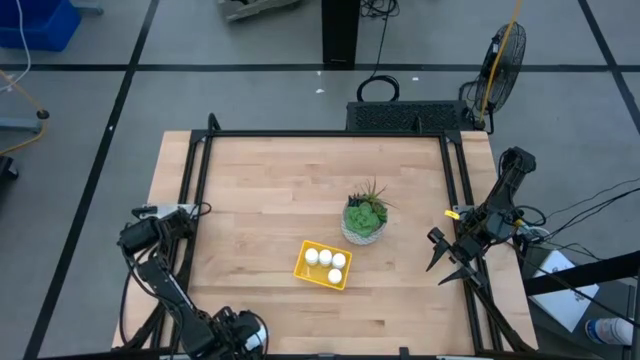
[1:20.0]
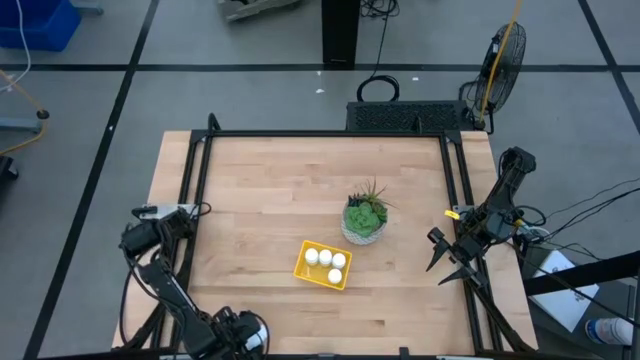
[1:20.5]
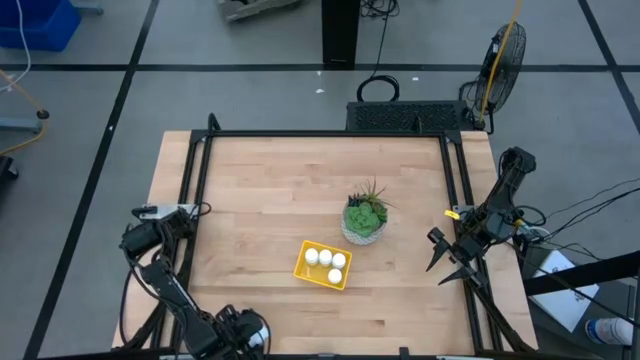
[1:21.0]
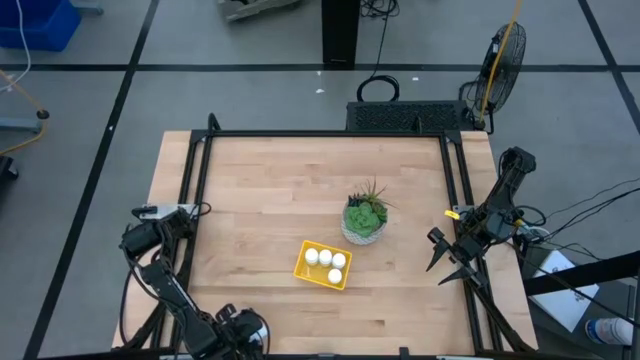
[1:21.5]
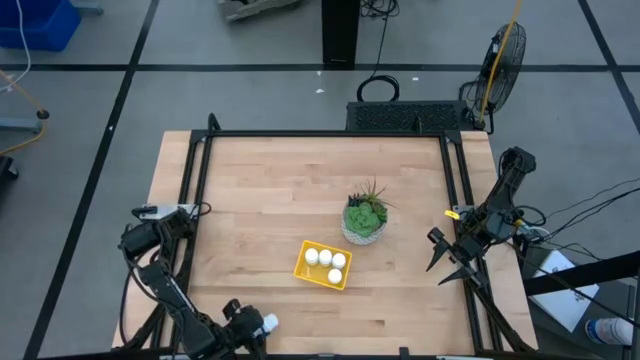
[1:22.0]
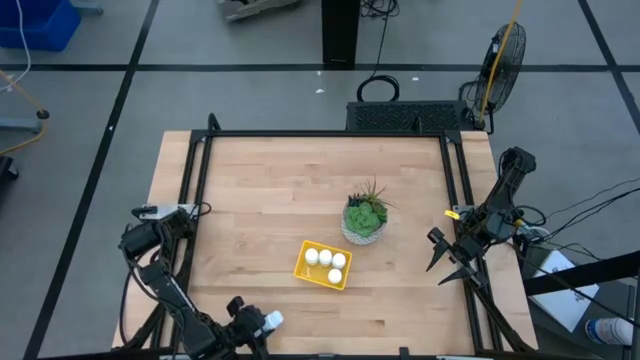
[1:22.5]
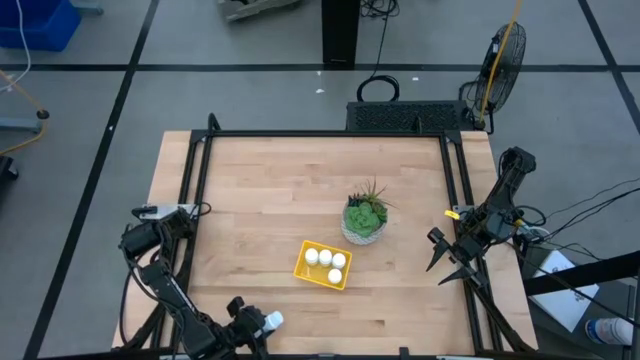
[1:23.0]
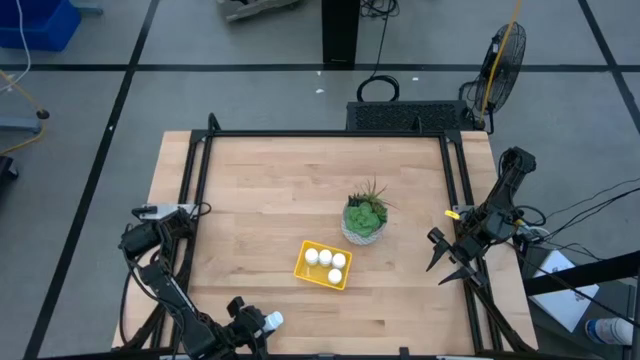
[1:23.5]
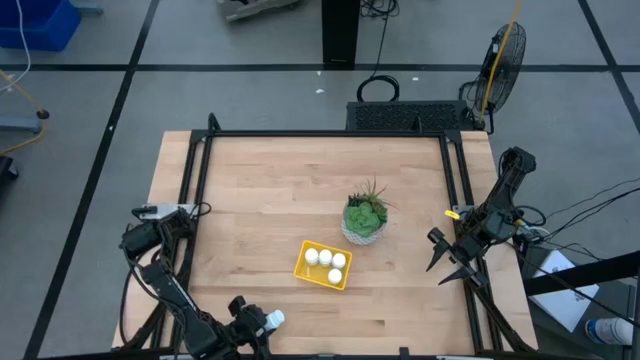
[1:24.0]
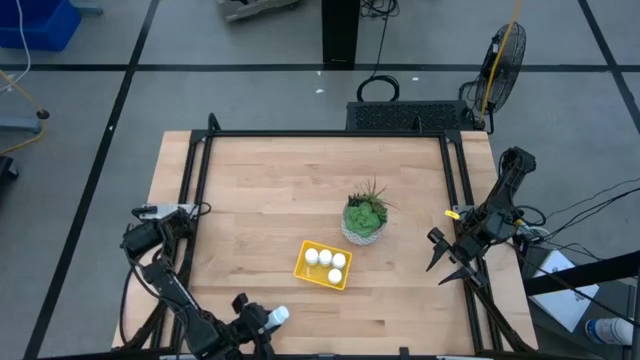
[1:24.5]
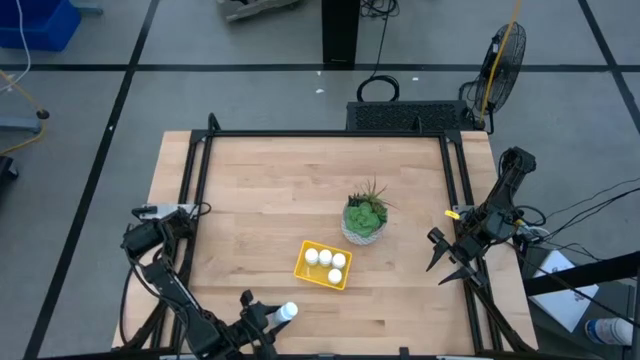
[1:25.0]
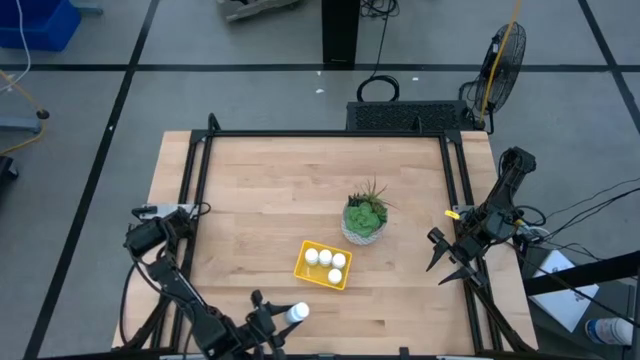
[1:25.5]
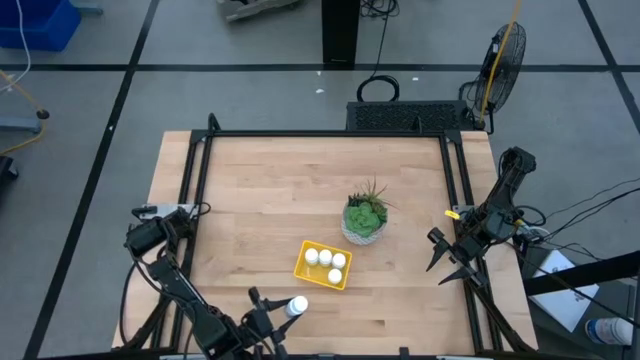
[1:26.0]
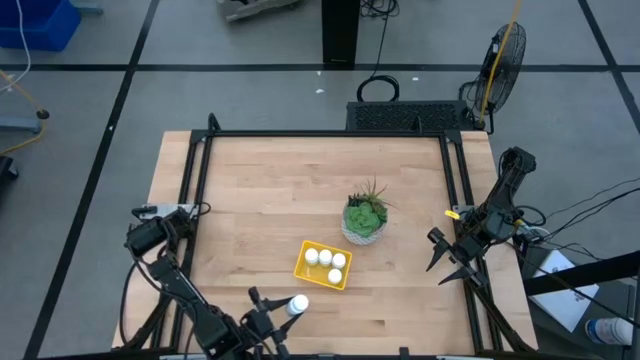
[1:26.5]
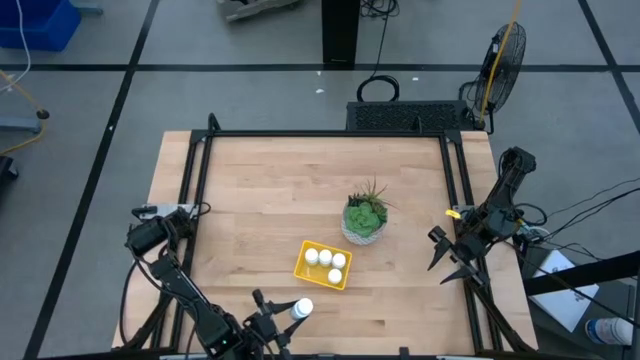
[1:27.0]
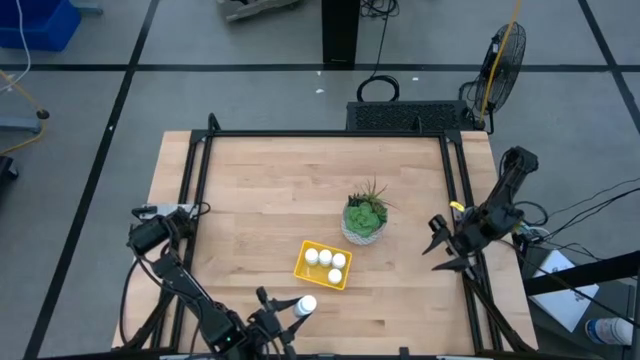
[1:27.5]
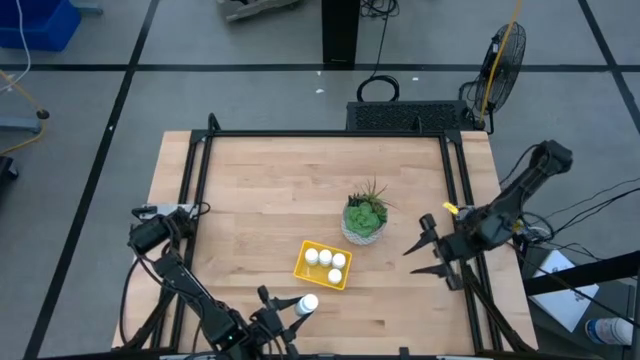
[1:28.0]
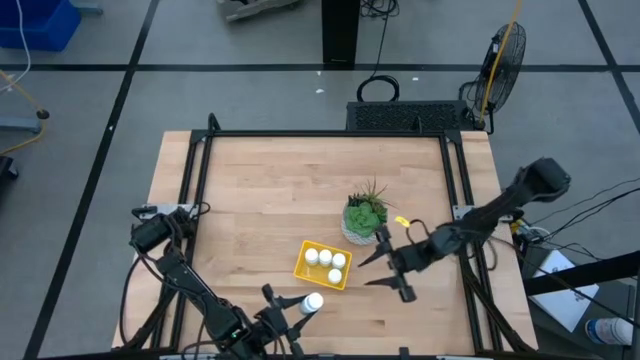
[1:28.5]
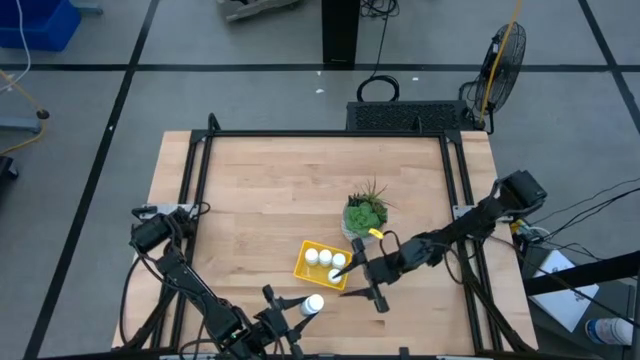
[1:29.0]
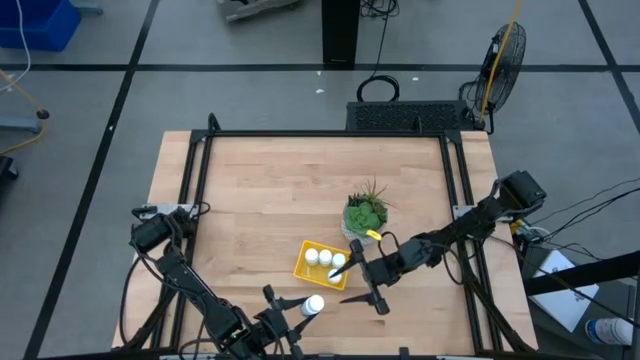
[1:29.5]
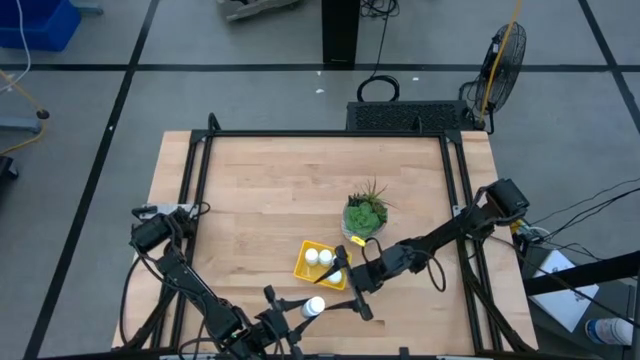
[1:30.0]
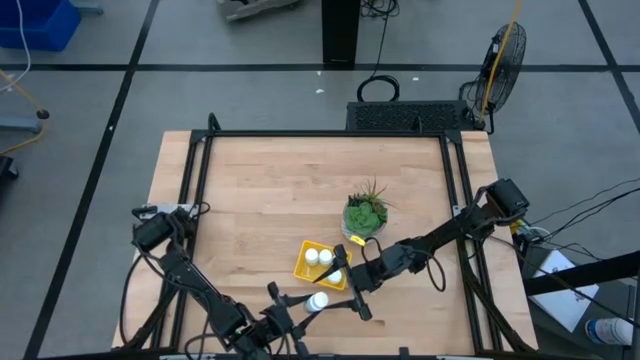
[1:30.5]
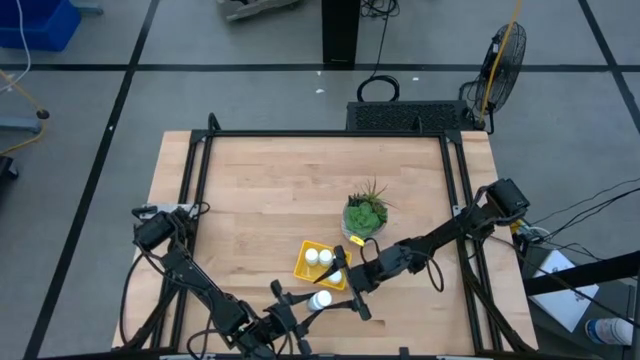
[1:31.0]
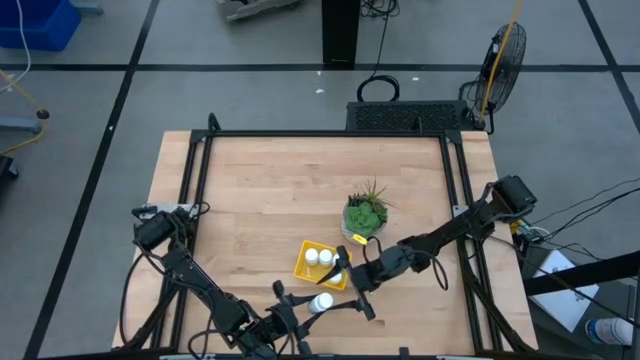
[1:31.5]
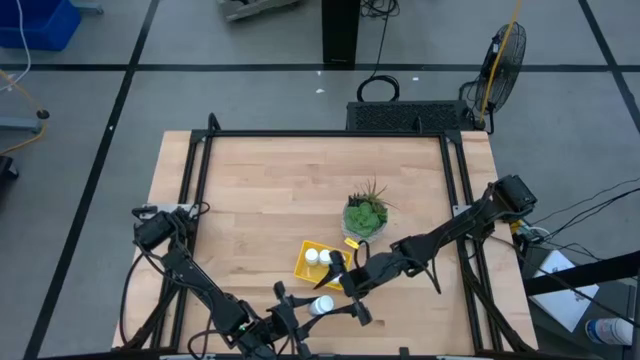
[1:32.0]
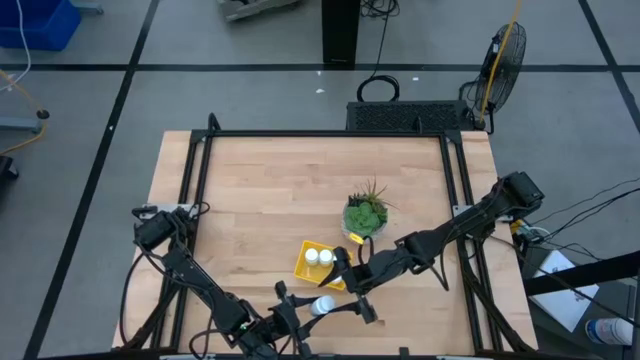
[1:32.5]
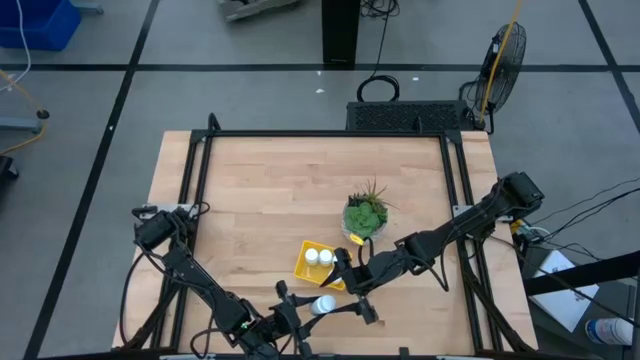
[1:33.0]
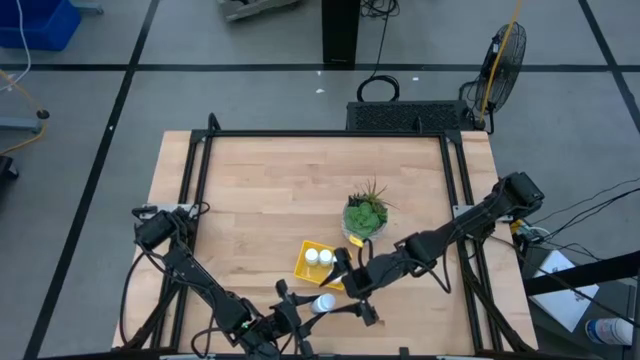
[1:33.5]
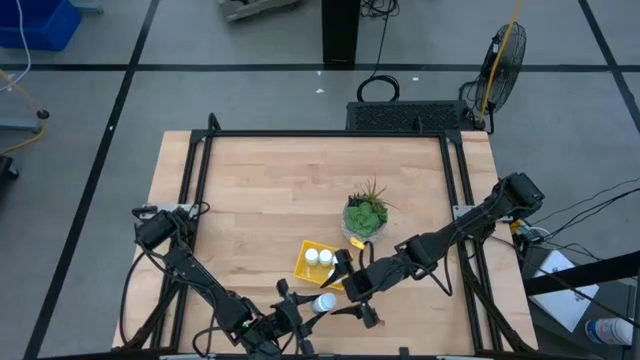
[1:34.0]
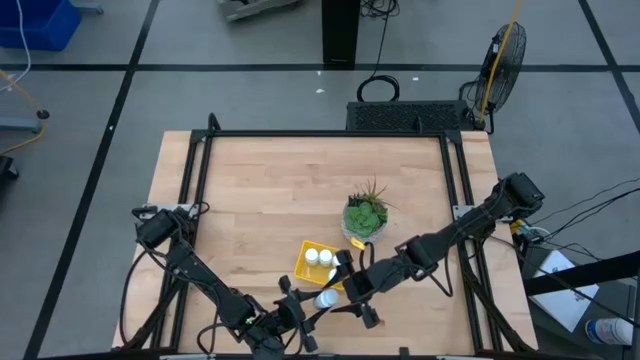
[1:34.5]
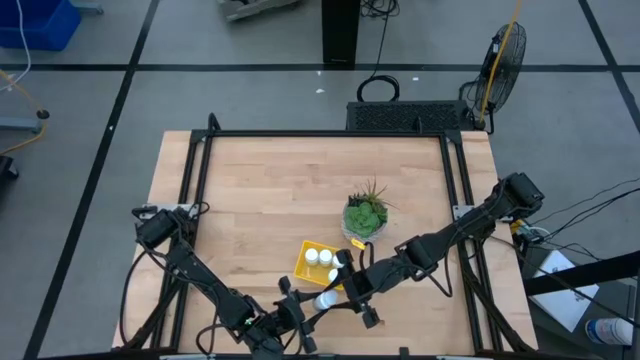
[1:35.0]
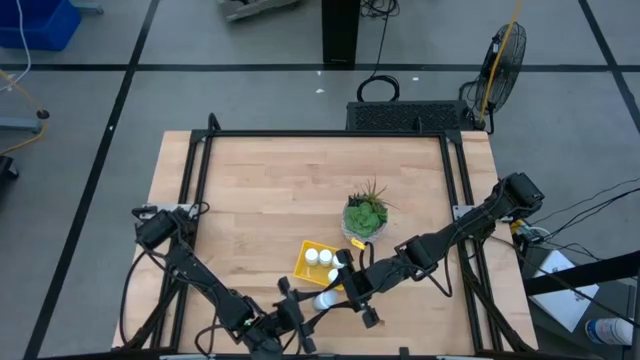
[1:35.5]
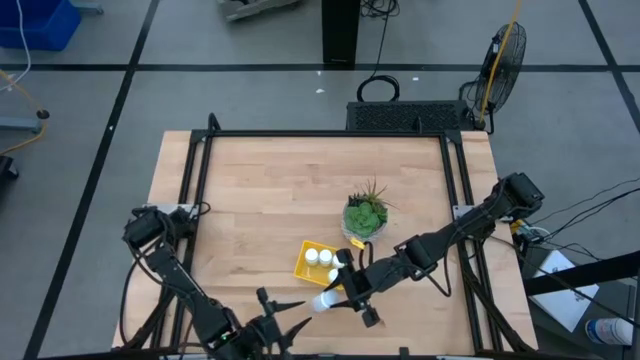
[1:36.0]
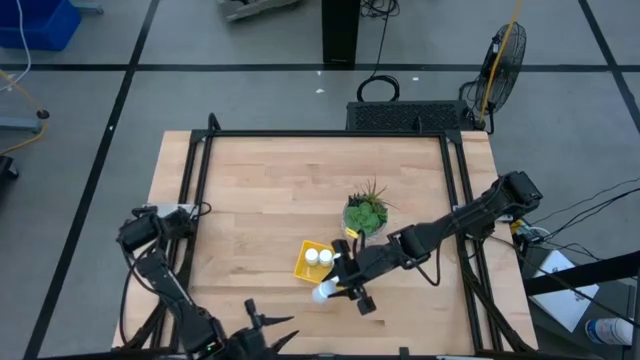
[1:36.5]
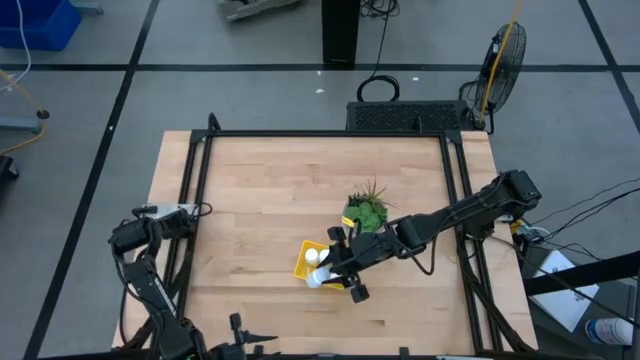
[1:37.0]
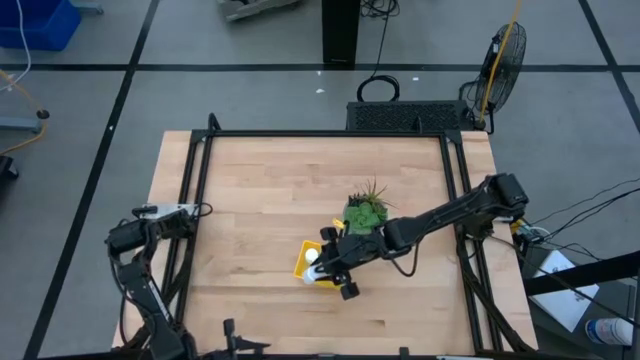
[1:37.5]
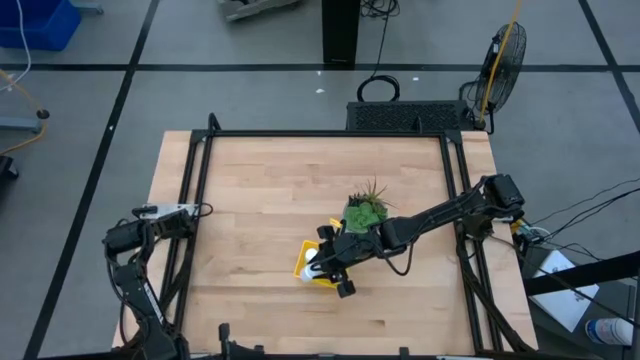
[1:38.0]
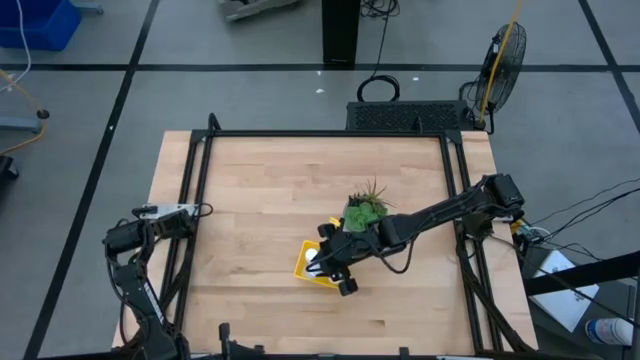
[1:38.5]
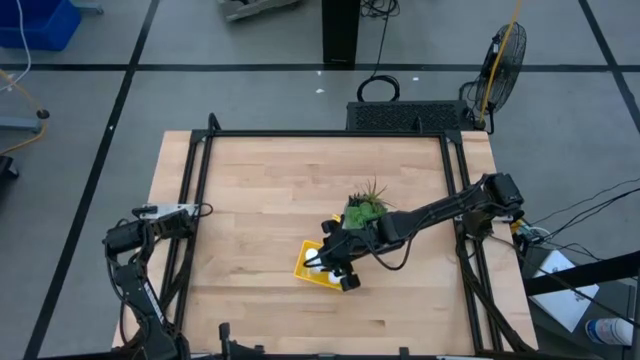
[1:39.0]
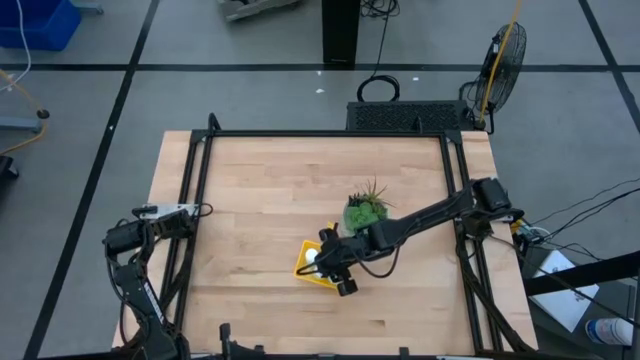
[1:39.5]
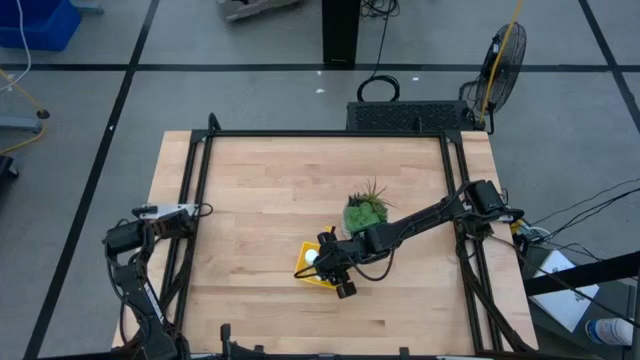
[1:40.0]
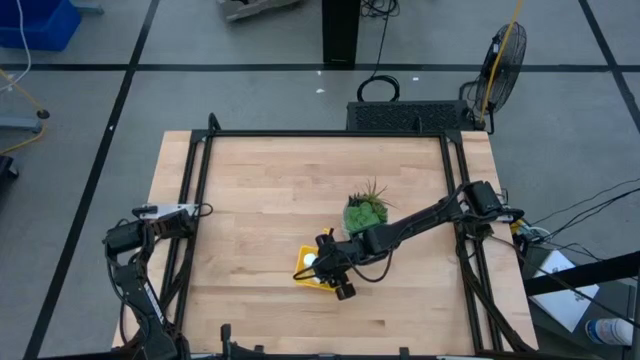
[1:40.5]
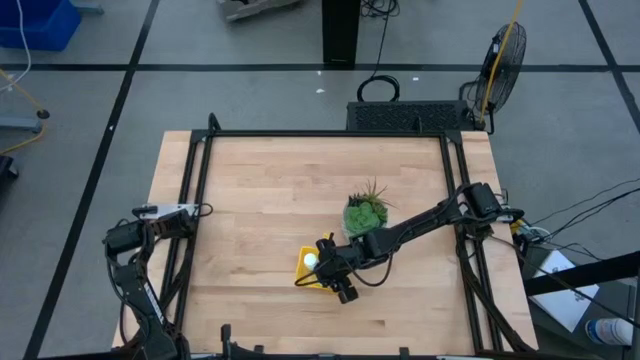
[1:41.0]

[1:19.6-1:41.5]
Task: Pick and place pill bottles into a basket
Put the white pill bottle into the yellow bin
